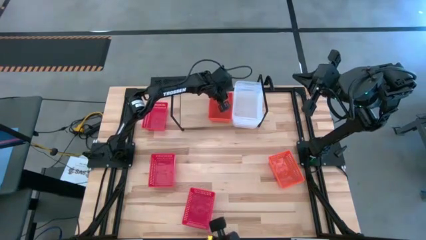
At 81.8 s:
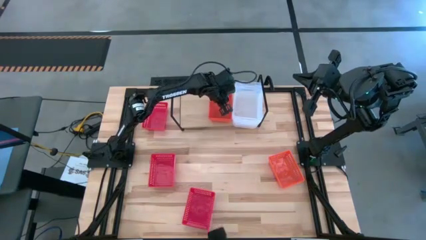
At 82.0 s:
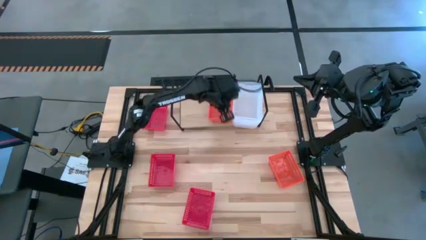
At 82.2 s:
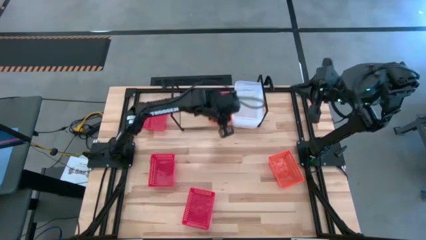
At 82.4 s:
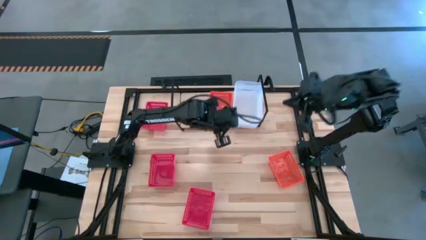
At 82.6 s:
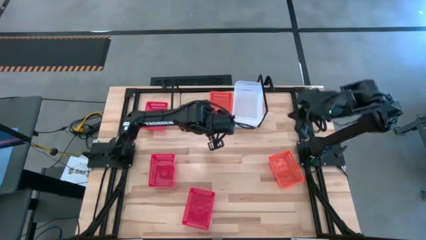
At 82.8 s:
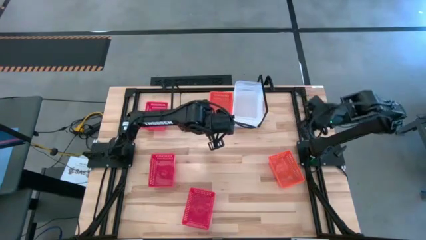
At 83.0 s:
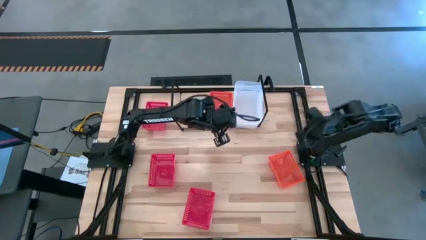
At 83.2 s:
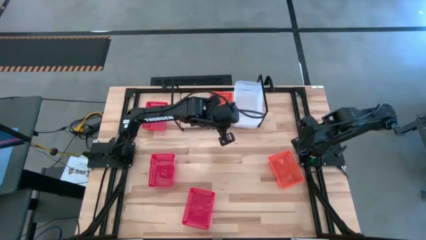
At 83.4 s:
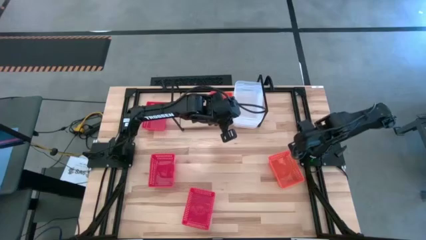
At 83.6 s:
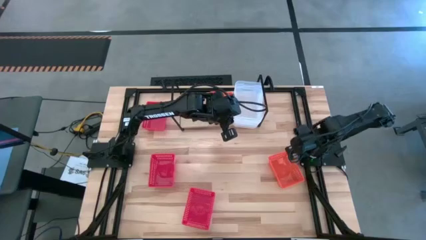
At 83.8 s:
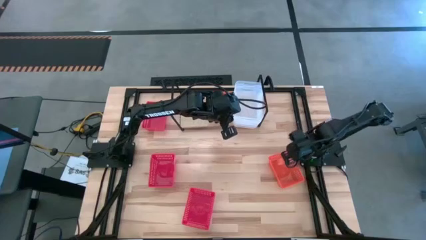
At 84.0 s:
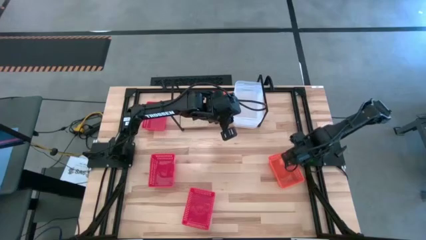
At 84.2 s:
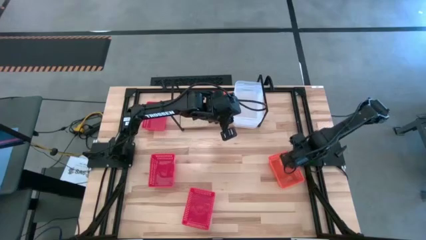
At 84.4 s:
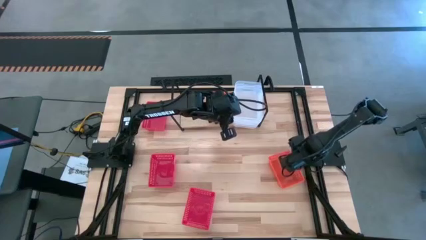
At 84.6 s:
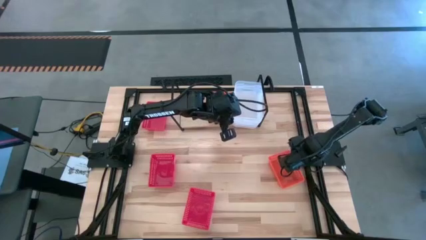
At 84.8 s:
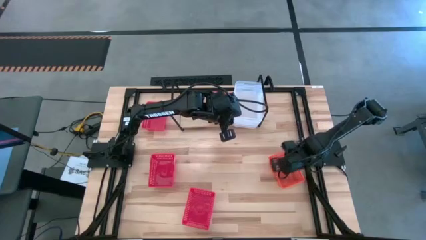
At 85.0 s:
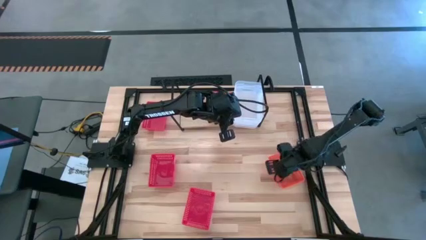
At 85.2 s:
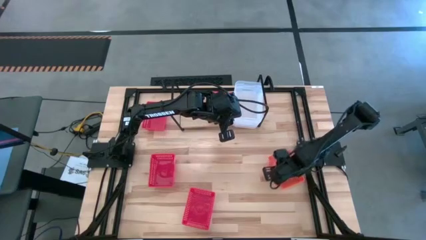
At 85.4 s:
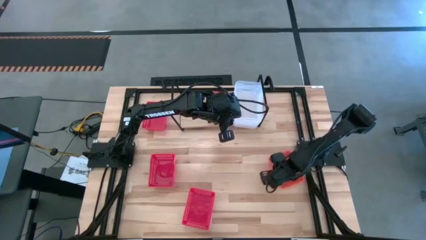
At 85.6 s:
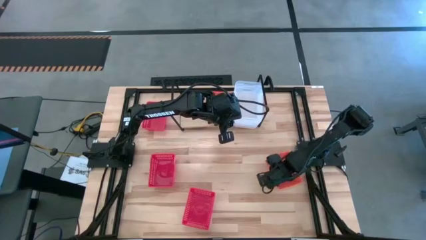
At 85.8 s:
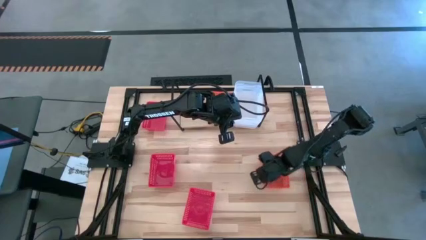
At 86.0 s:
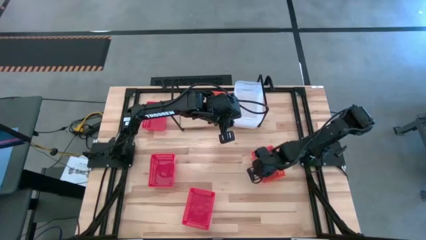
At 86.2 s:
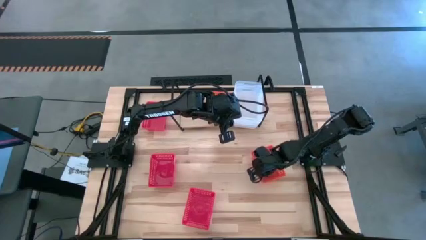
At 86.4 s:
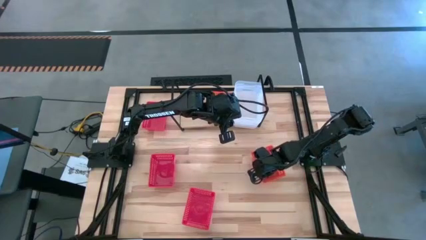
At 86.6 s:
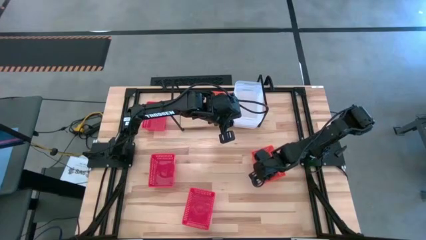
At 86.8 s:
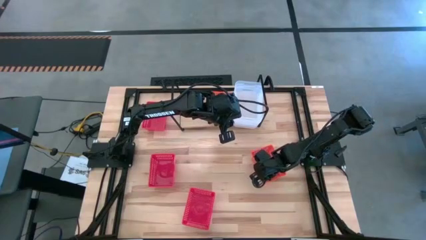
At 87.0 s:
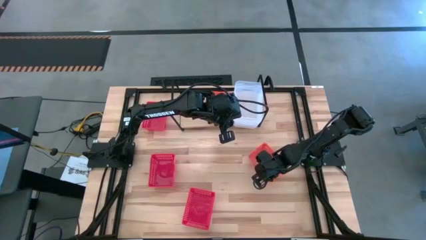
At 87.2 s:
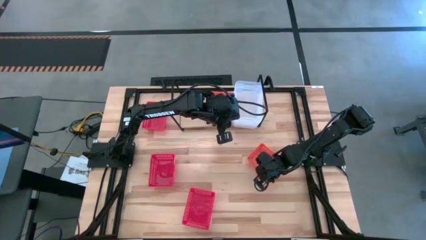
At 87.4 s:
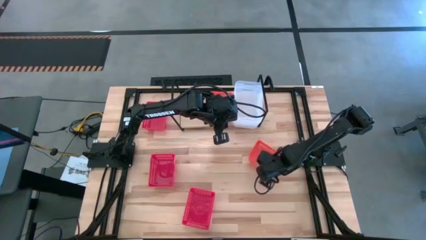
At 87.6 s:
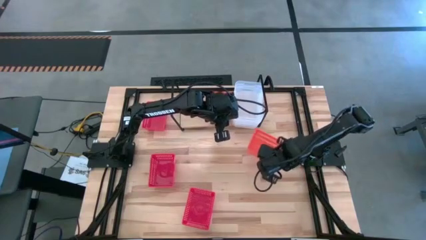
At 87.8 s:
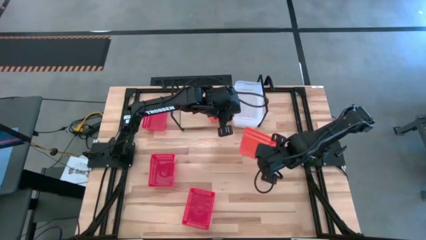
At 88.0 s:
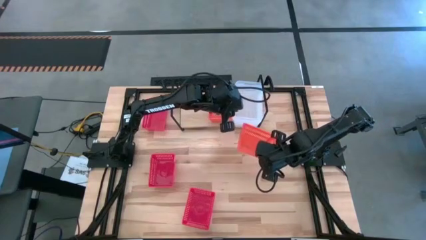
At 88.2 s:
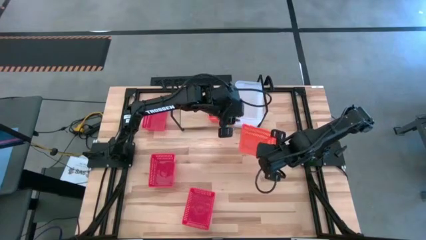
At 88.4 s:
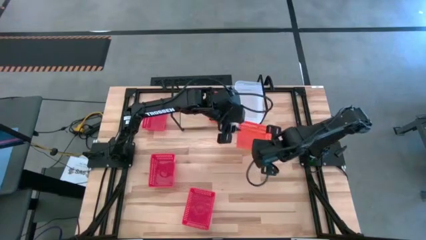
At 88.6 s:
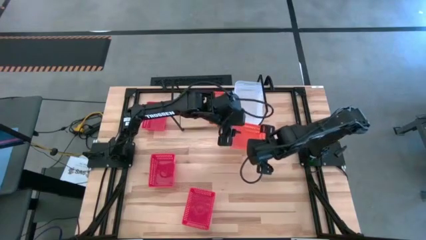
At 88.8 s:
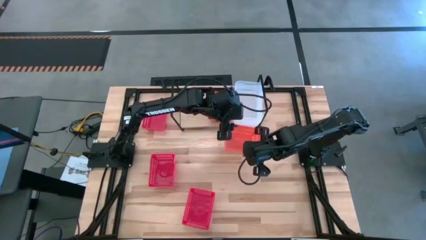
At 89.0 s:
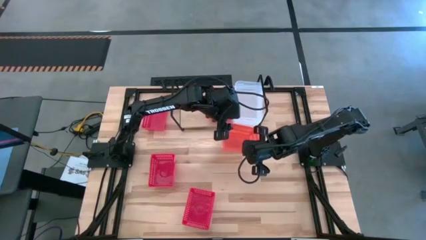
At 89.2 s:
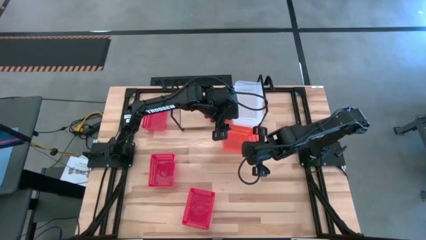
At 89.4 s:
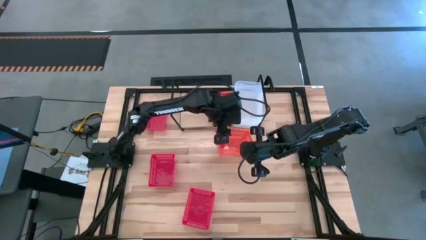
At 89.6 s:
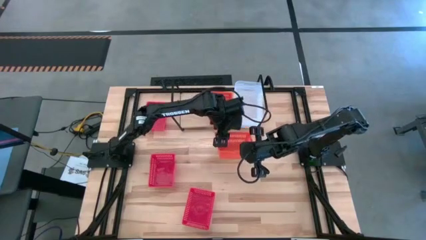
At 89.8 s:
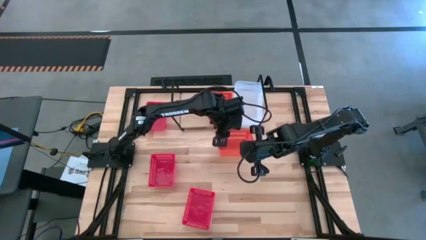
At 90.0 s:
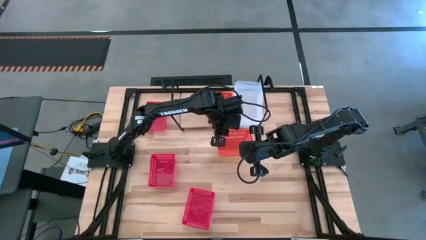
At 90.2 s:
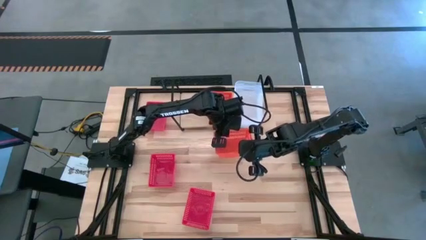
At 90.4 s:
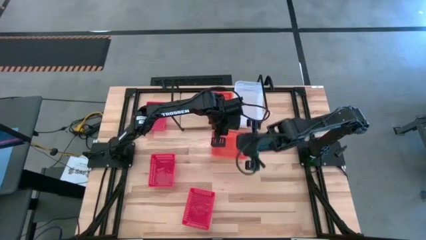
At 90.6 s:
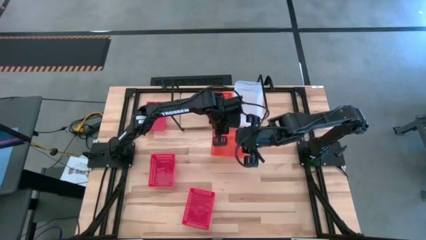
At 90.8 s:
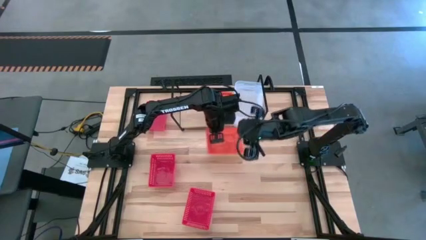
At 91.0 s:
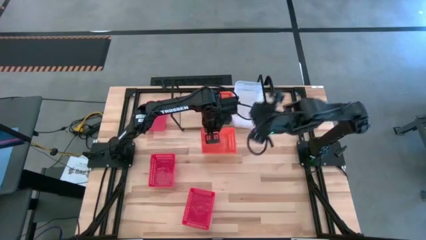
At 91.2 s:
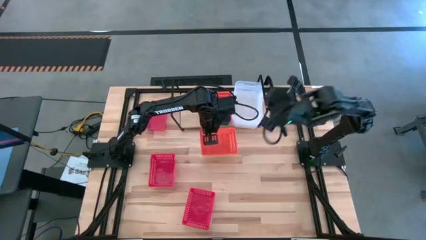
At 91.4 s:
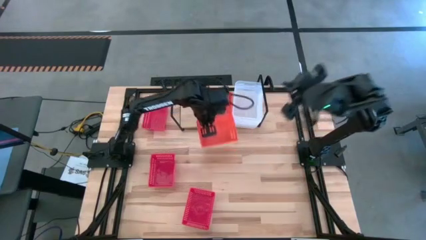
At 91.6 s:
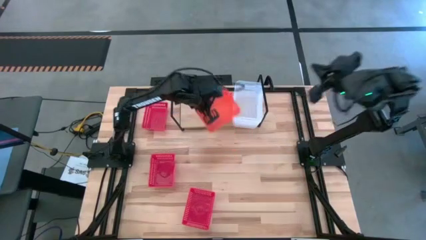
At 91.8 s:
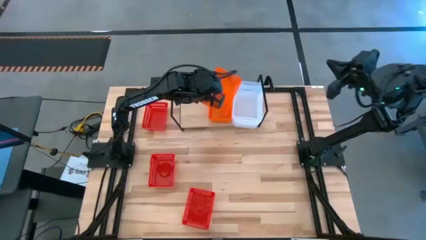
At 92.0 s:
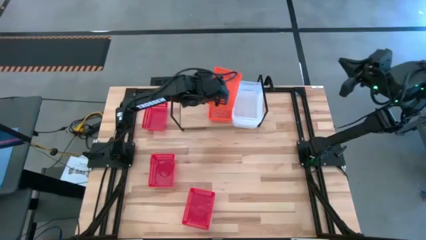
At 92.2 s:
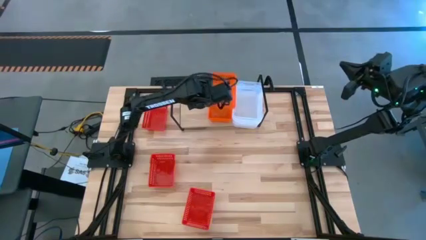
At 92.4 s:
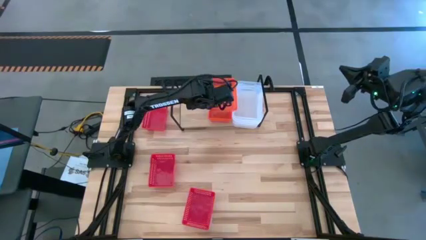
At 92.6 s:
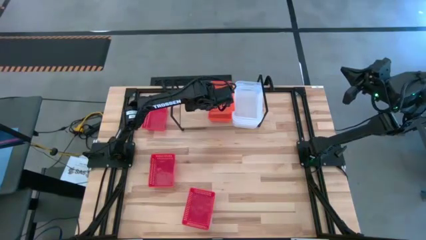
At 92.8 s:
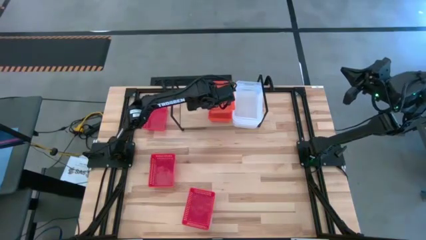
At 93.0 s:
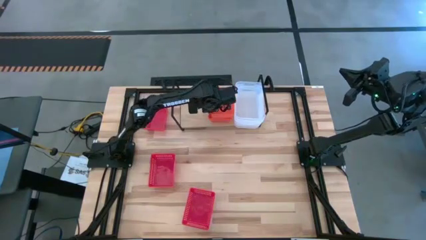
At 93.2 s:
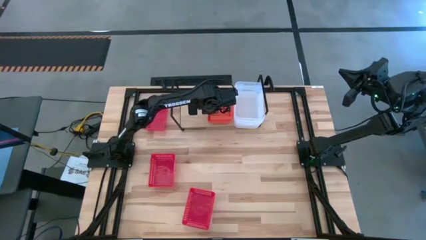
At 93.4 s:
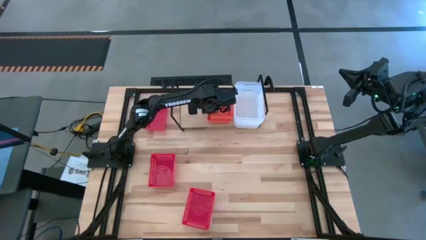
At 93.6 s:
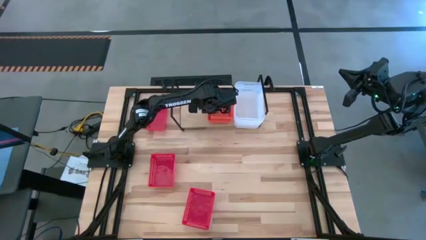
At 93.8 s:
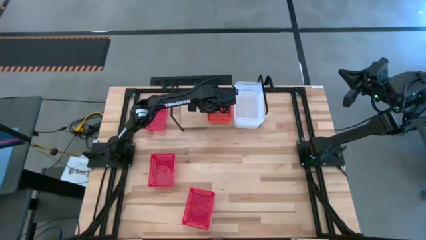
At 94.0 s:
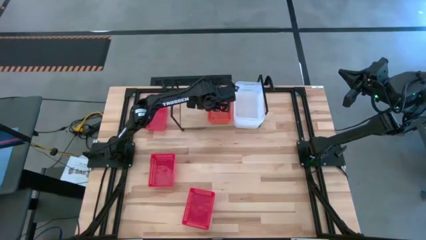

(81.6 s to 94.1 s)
Task: Stack baskets on shelf by color
Stack the orange bin on top of the orange bins on the shelf

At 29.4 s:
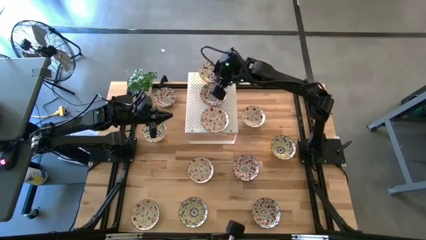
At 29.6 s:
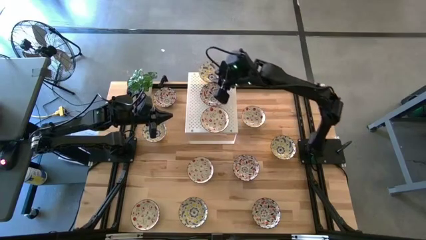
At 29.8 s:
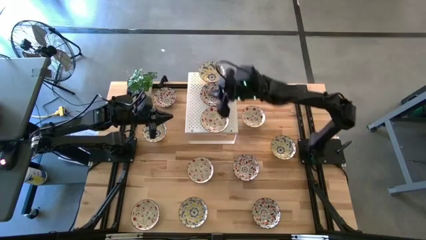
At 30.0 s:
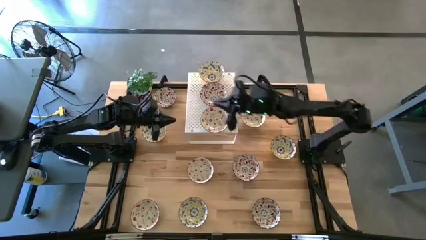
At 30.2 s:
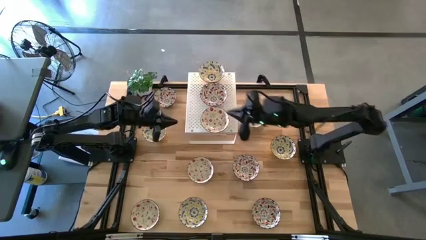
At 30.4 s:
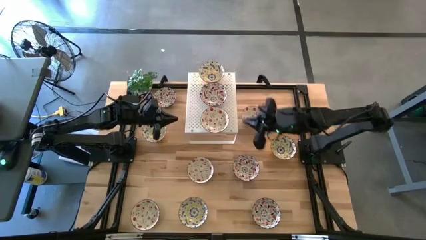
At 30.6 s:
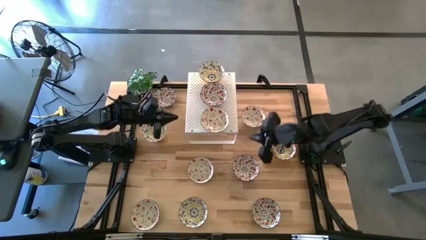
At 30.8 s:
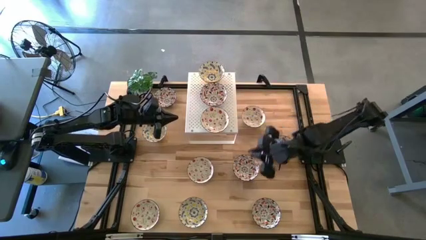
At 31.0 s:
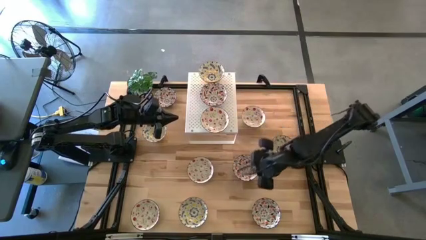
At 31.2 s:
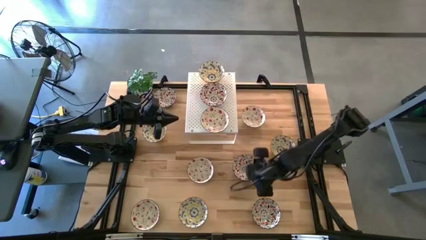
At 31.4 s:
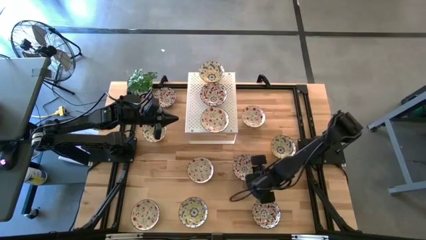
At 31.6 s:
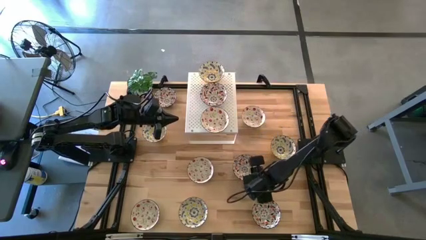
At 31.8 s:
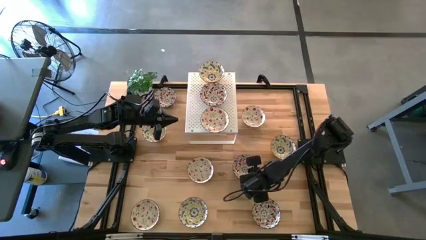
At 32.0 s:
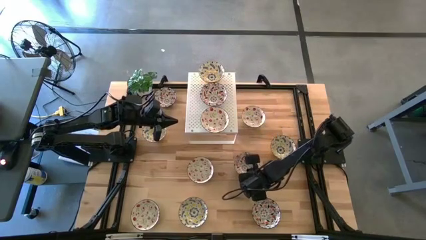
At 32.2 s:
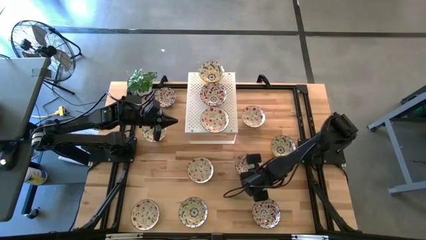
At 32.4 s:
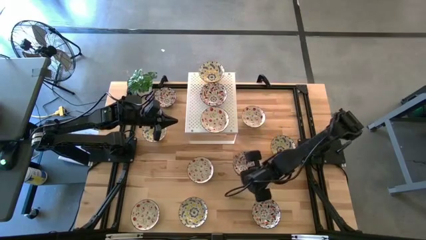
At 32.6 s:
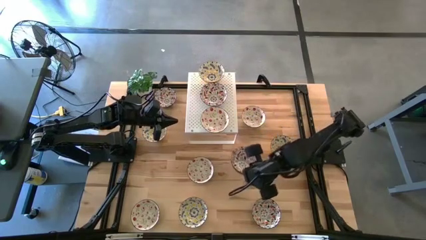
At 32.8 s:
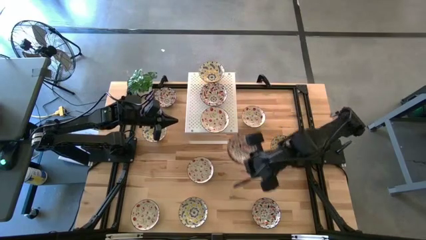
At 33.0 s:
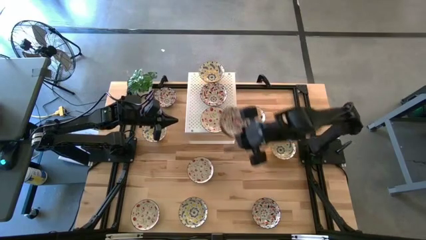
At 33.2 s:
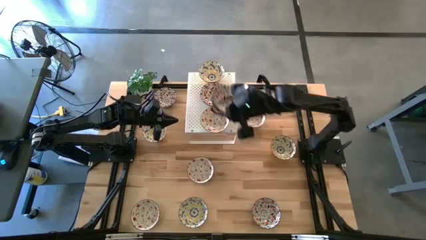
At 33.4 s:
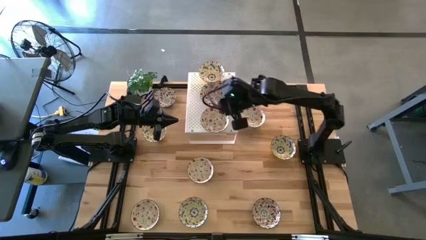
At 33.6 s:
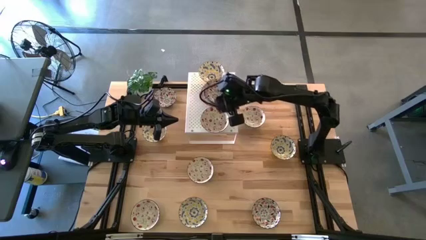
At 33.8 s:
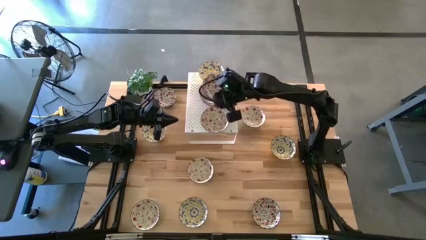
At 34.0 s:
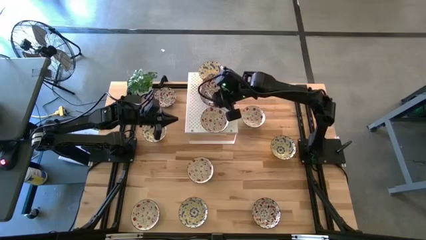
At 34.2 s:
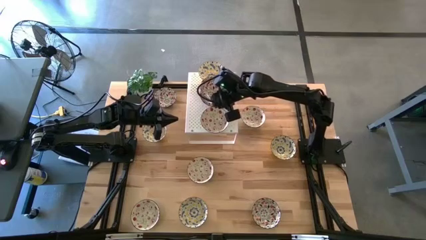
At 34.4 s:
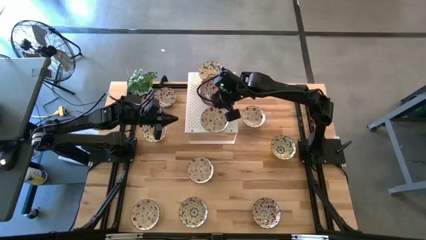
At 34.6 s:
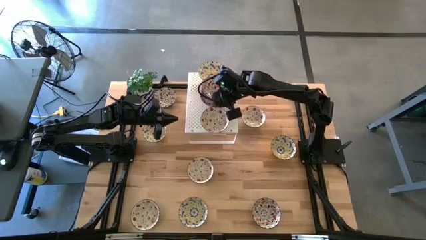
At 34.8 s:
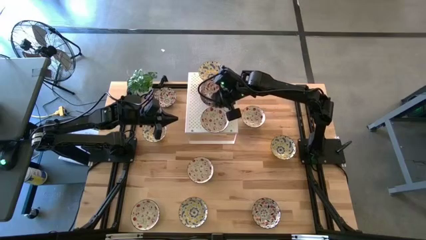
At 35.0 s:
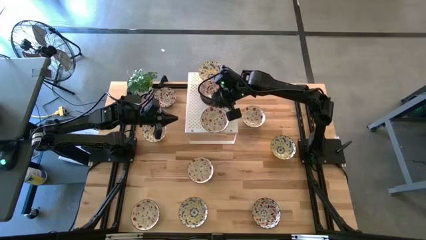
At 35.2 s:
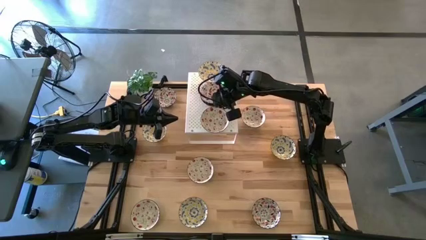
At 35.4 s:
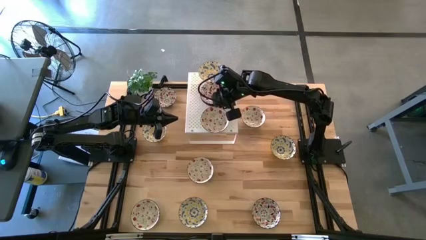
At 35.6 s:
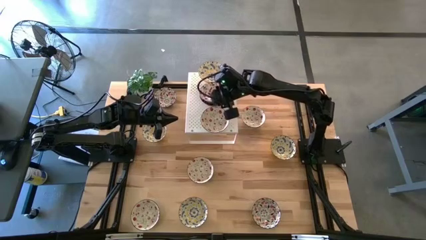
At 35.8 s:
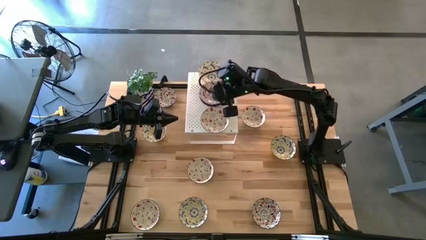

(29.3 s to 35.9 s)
Task: Pick & Place Mini bowls
Stack the orange patterned bowl on top of the orange patterned bowl on the shelf
